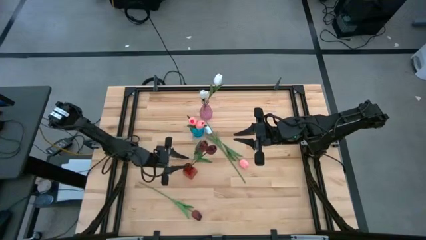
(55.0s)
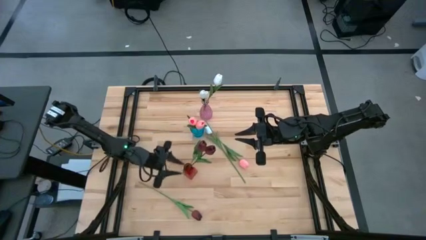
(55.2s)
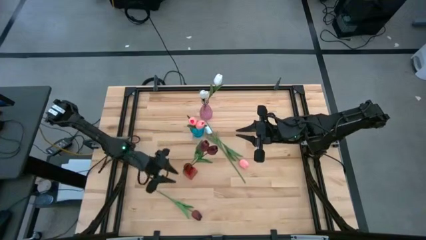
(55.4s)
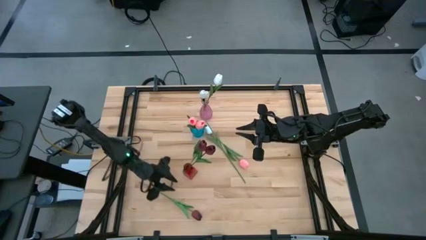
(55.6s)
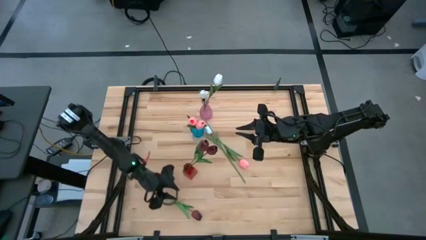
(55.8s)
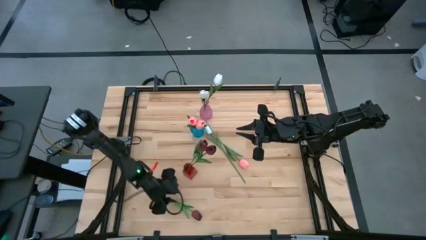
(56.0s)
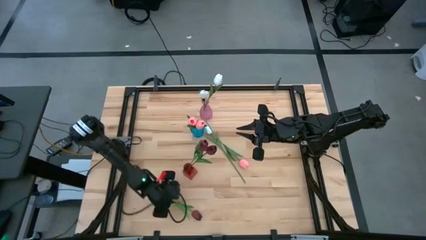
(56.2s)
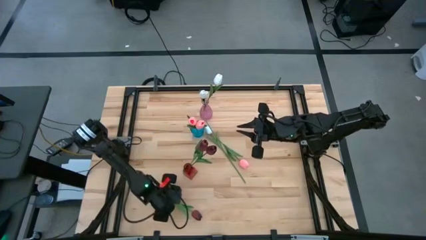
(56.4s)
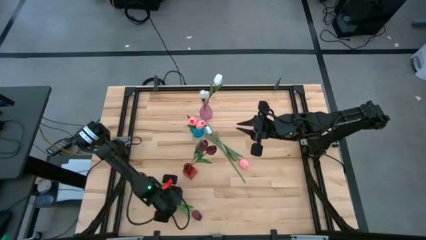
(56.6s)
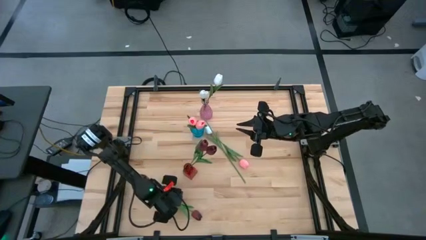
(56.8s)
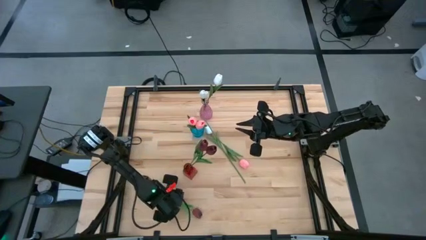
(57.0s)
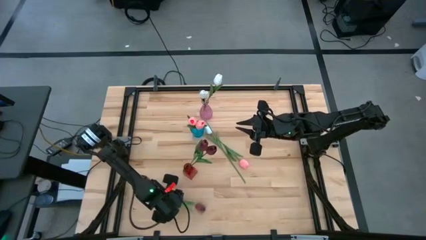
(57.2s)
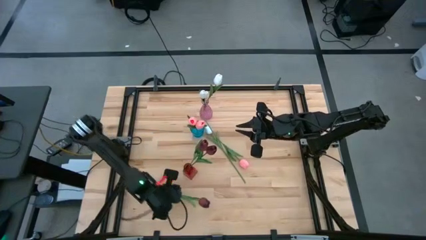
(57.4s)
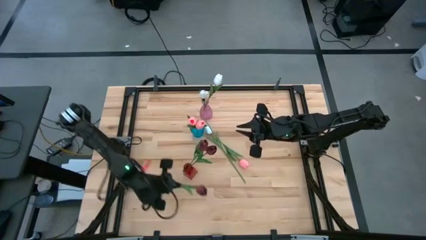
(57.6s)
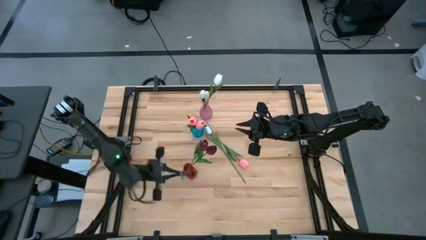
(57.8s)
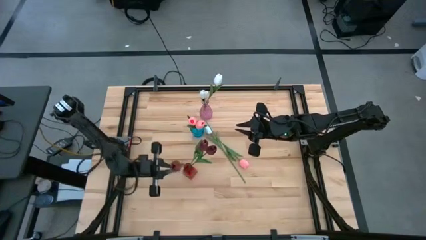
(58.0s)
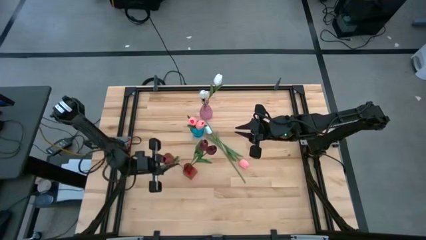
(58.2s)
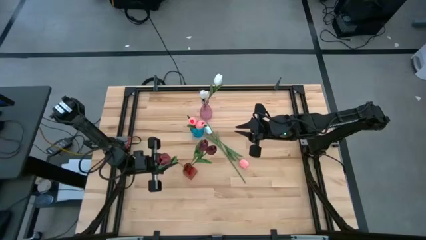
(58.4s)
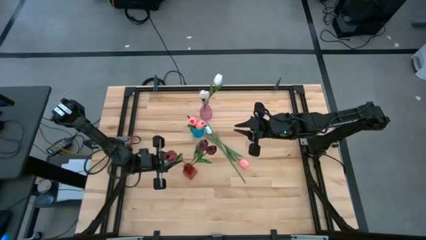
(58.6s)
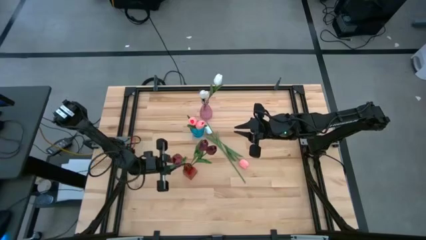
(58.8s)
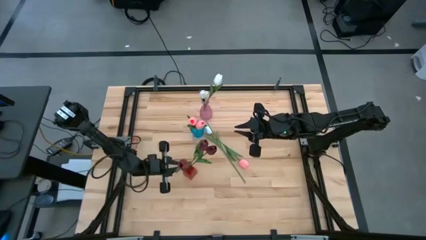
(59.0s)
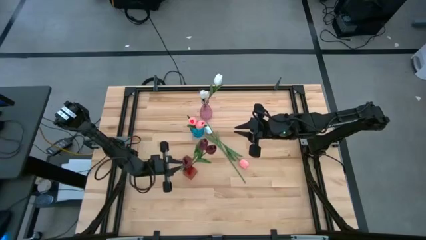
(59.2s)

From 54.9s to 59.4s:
Task: Sort flowers into vase by color
Put the red flower into the red vase

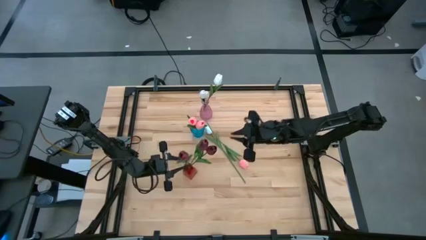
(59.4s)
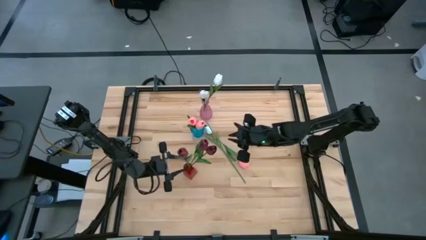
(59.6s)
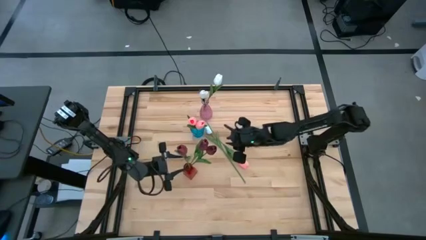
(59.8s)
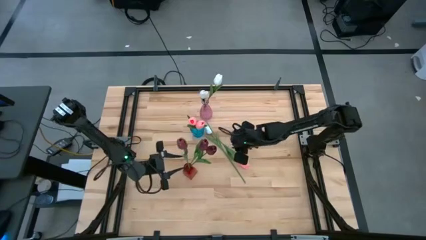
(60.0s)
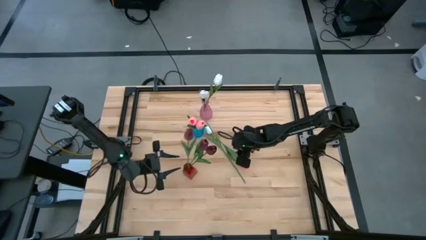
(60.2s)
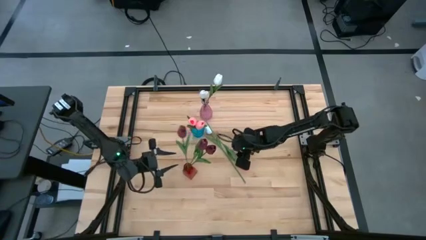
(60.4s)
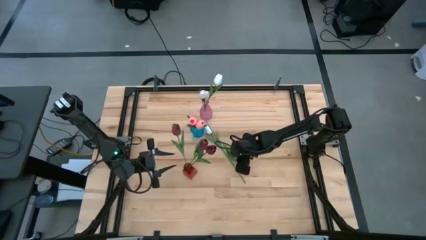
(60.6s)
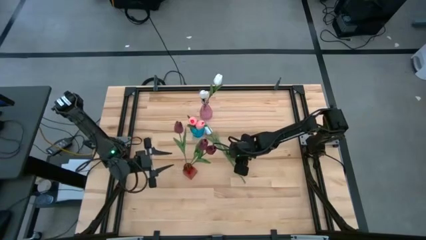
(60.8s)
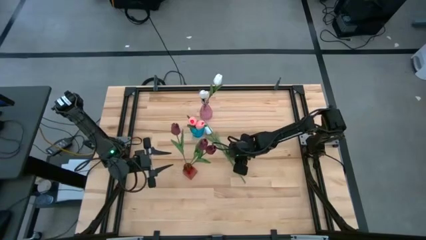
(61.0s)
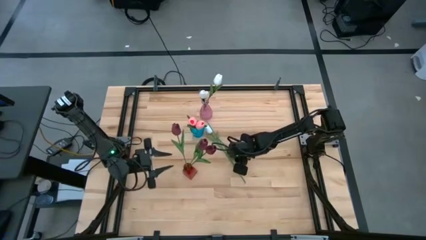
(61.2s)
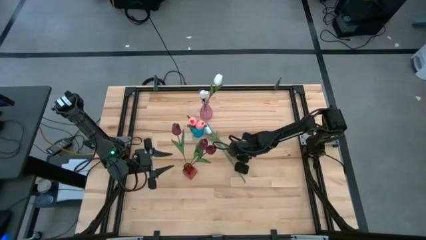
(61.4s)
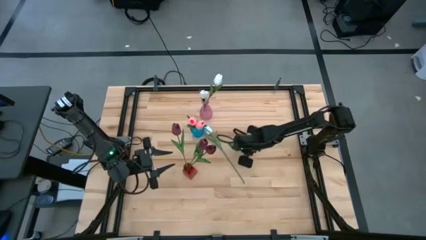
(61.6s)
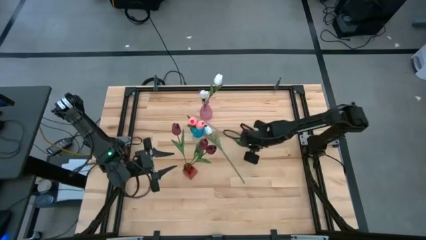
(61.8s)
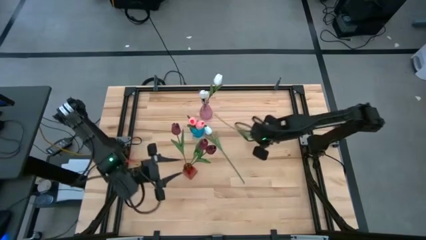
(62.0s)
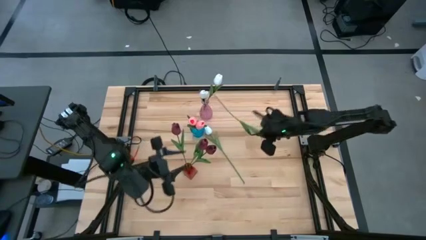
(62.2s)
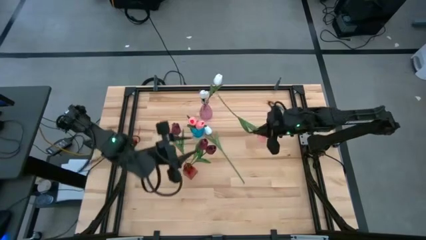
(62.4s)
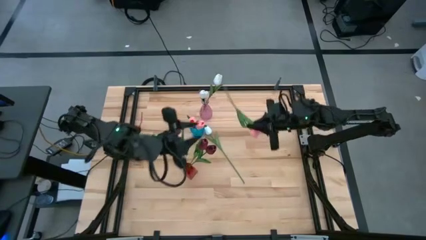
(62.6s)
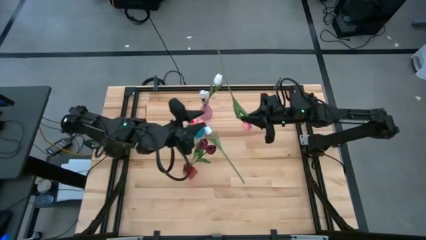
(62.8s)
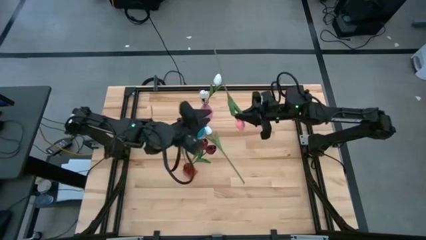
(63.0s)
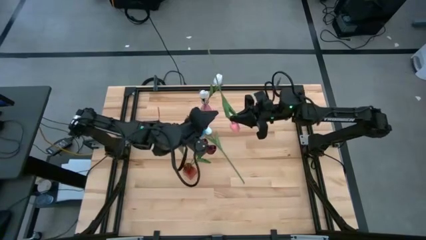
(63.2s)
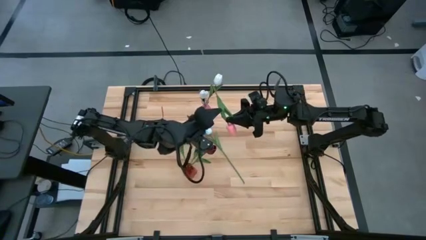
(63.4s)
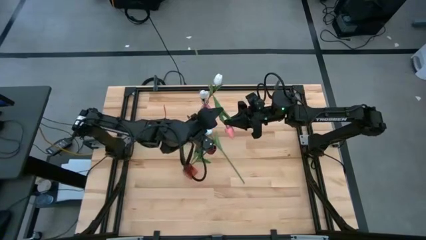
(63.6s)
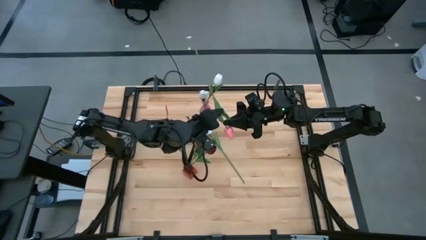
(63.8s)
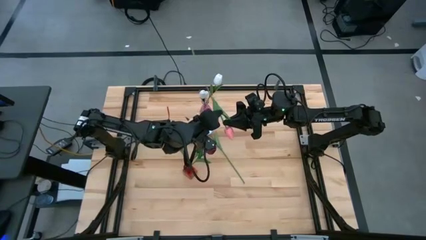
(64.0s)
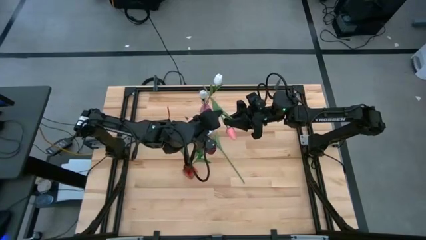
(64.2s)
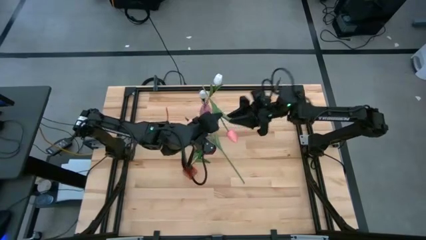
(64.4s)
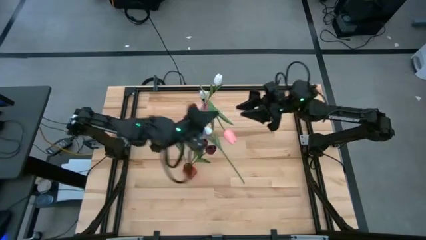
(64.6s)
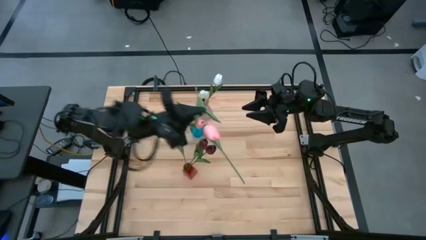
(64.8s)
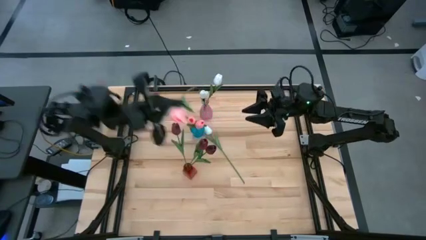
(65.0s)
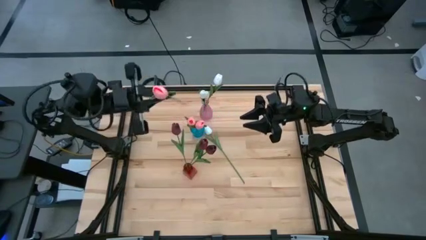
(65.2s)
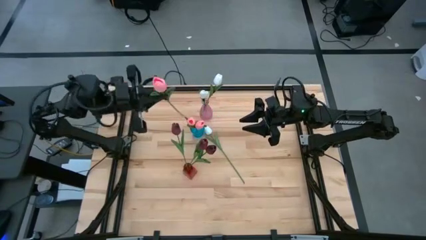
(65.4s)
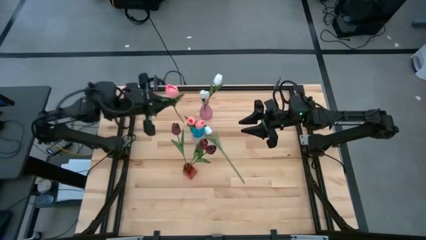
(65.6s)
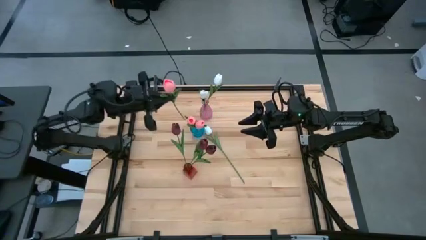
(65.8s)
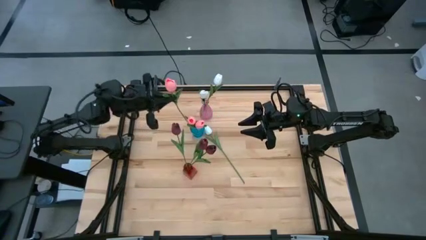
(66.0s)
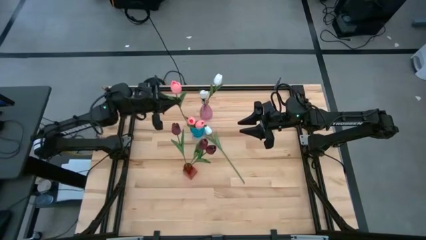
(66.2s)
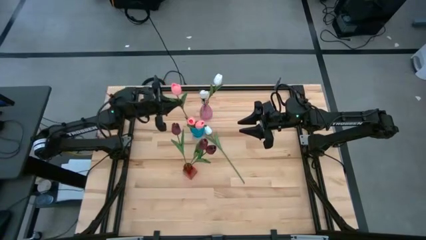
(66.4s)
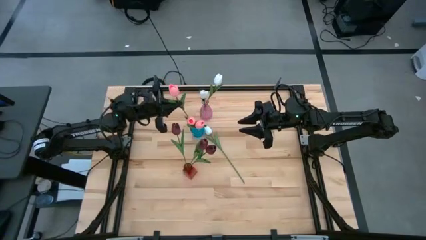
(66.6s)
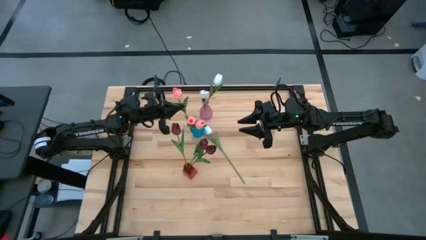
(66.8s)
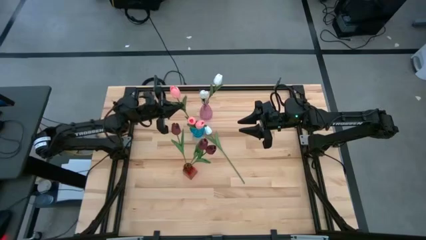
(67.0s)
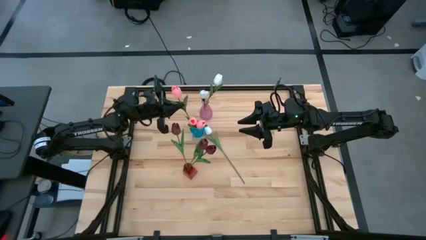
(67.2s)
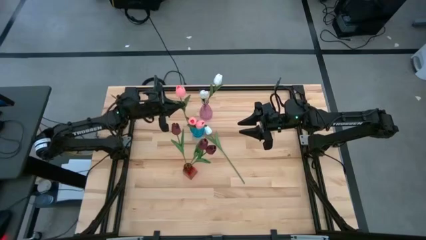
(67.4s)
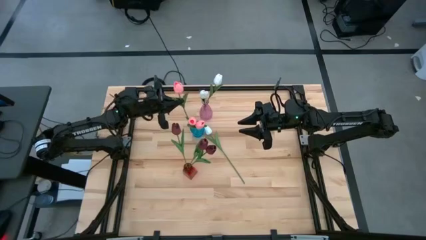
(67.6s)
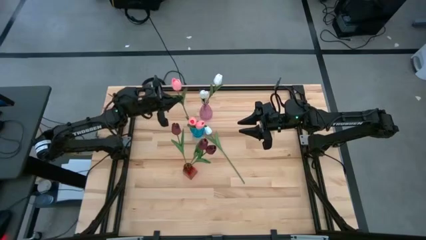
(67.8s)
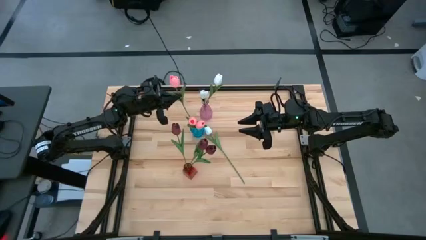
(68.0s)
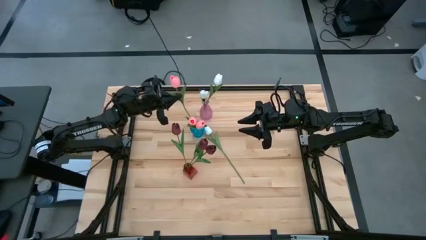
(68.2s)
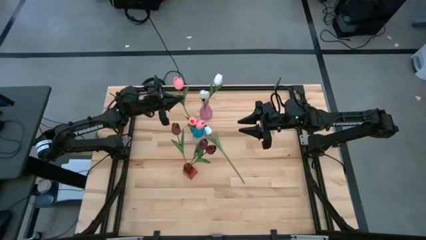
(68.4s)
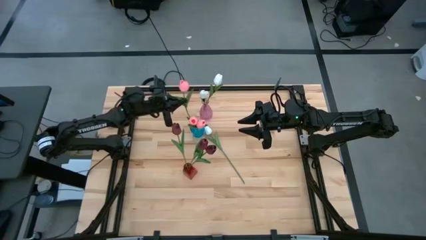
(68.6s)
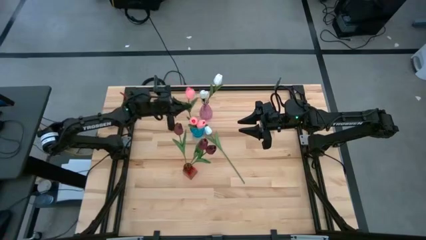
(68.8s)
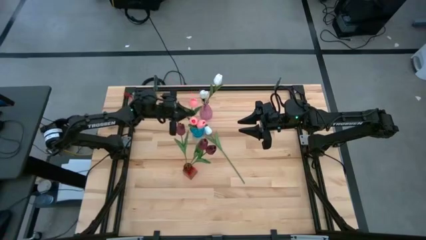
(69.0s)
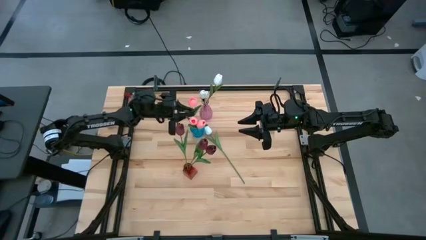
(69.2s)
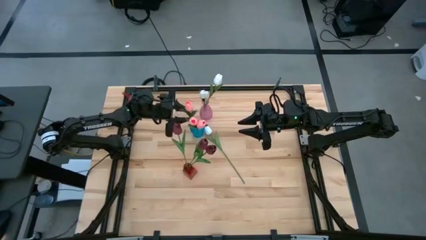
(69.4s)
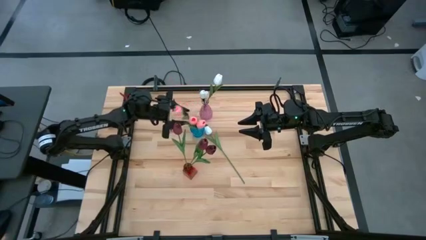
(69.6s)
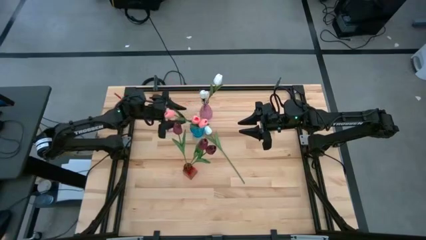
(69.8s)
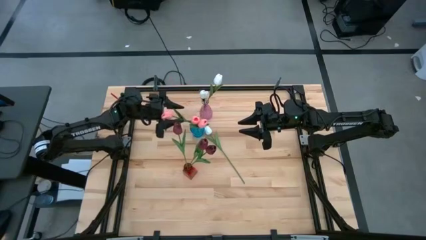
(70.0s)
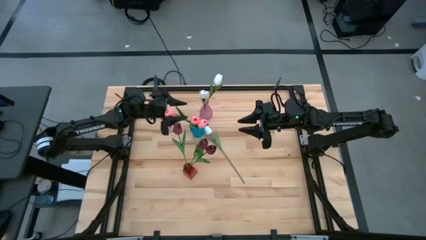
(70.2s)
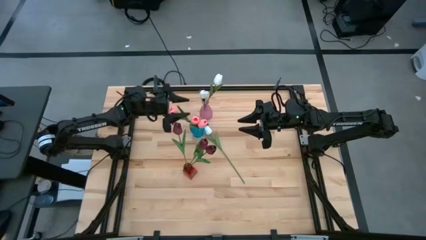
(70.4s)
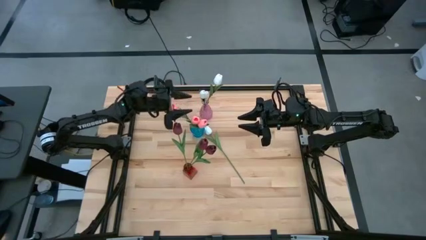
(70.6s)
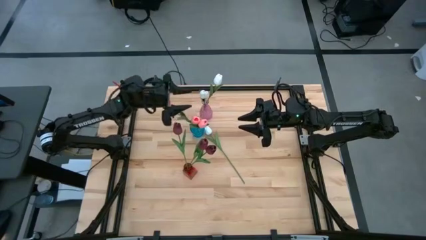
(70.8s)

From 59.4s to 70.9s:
Put the pink flower into the blue vase
